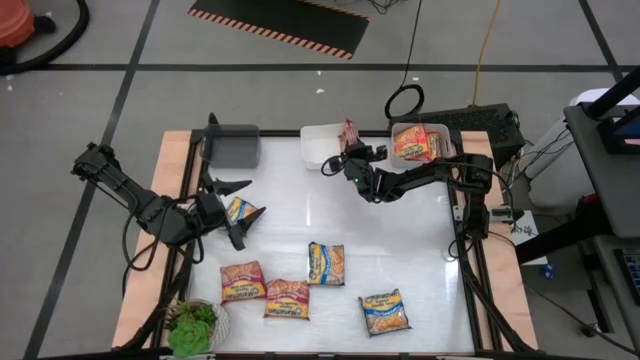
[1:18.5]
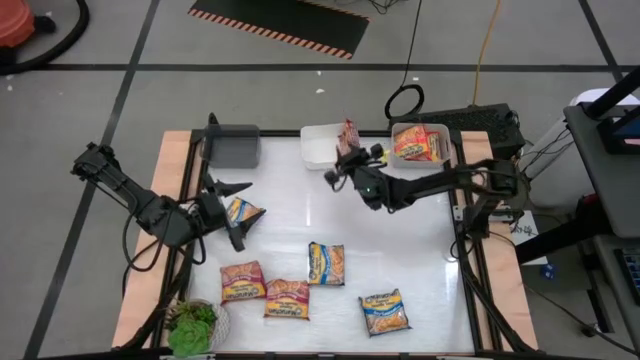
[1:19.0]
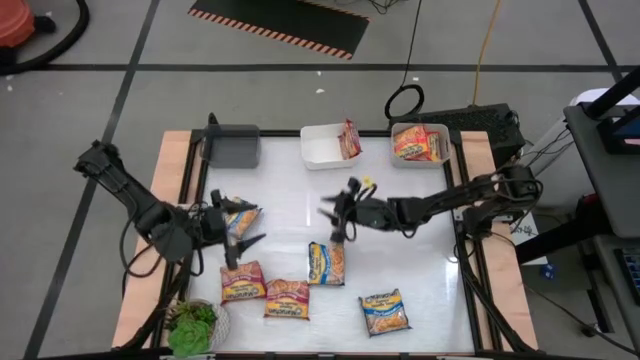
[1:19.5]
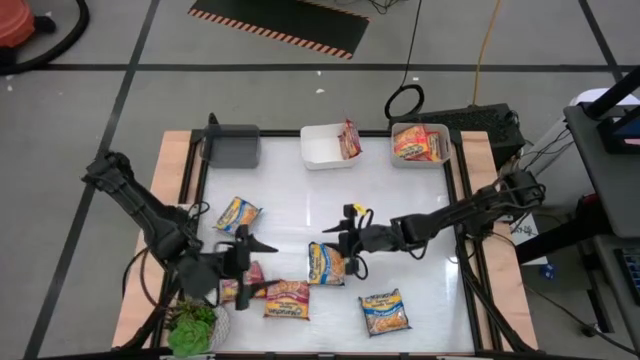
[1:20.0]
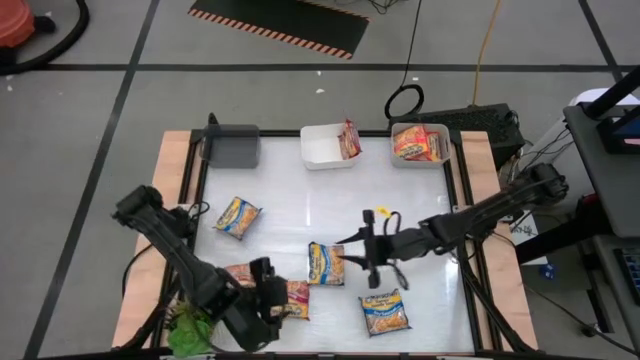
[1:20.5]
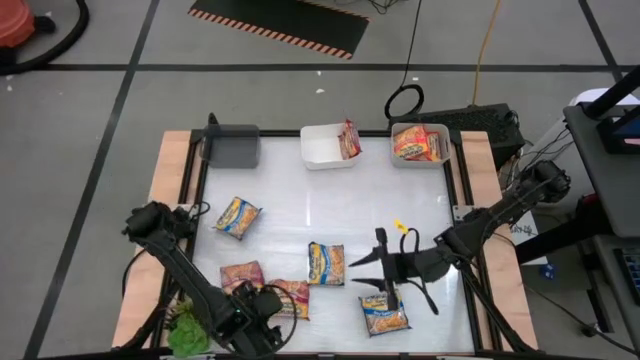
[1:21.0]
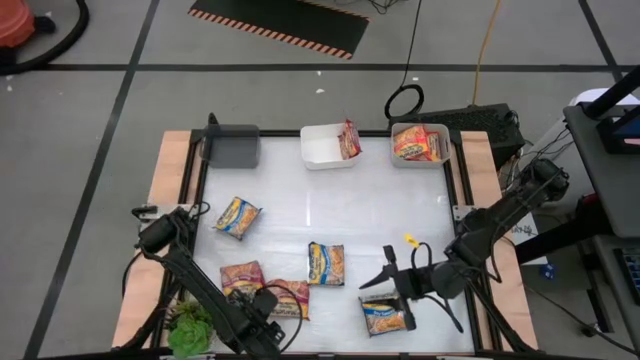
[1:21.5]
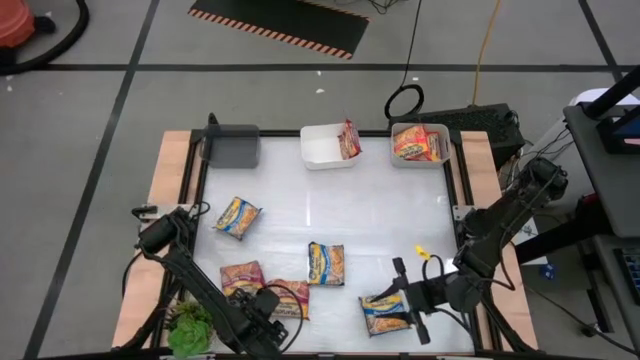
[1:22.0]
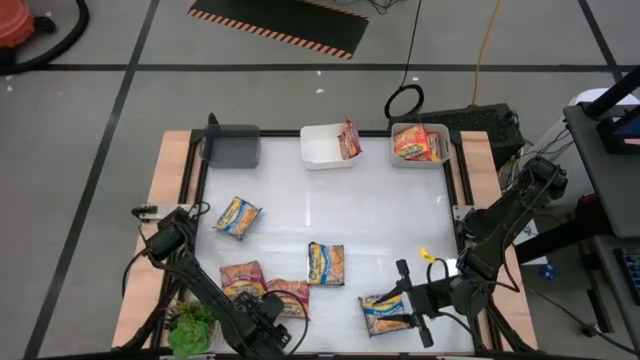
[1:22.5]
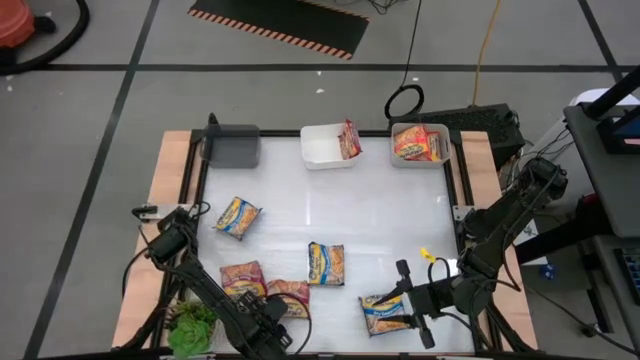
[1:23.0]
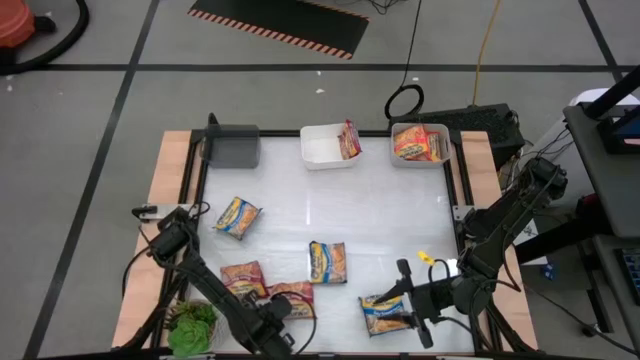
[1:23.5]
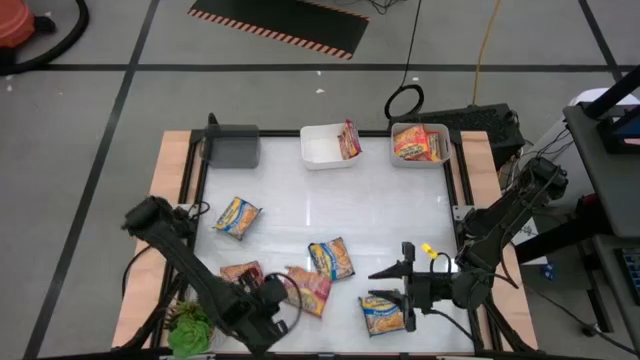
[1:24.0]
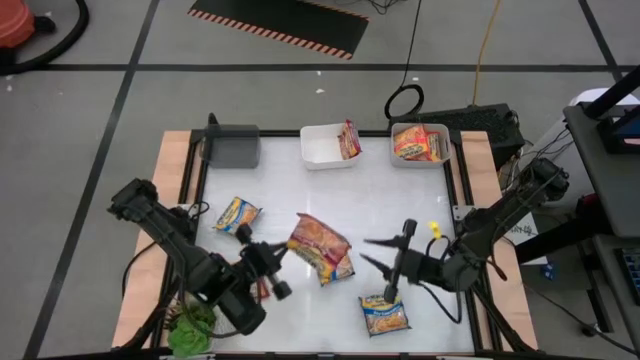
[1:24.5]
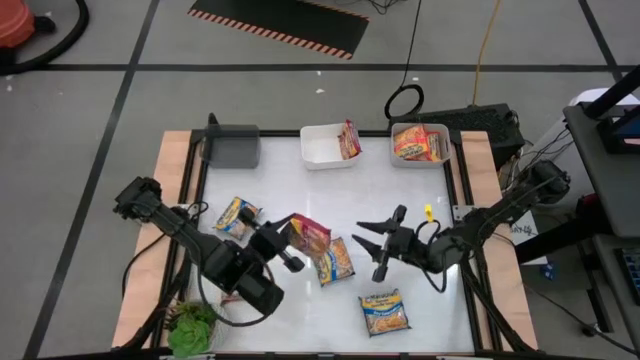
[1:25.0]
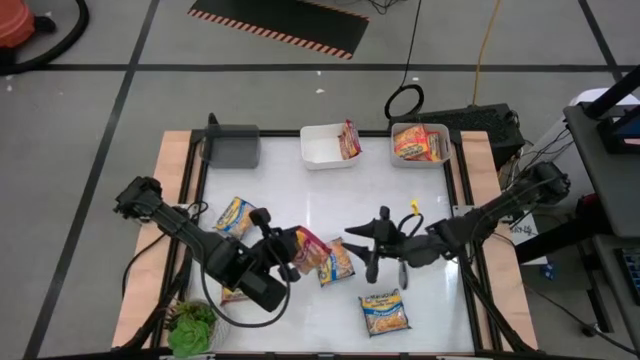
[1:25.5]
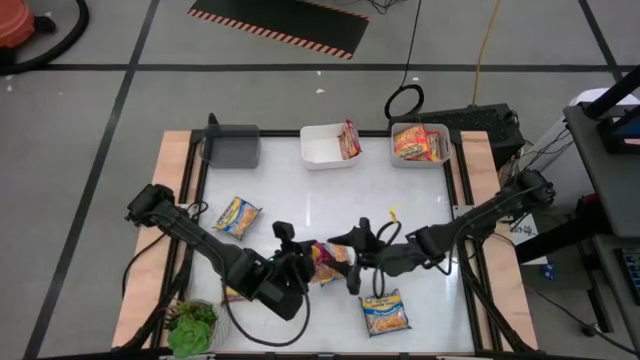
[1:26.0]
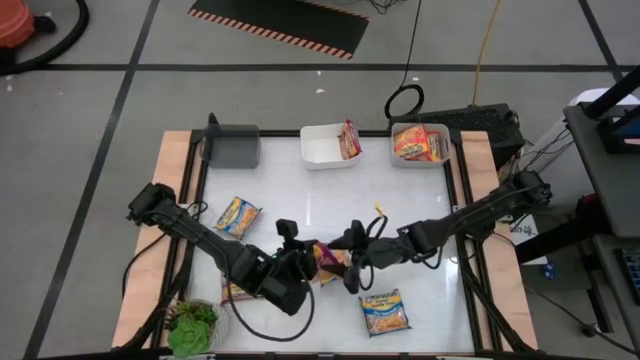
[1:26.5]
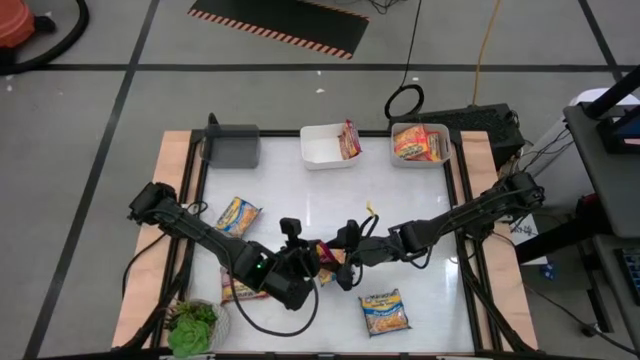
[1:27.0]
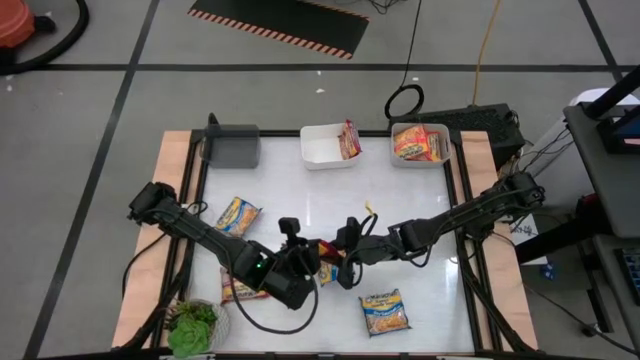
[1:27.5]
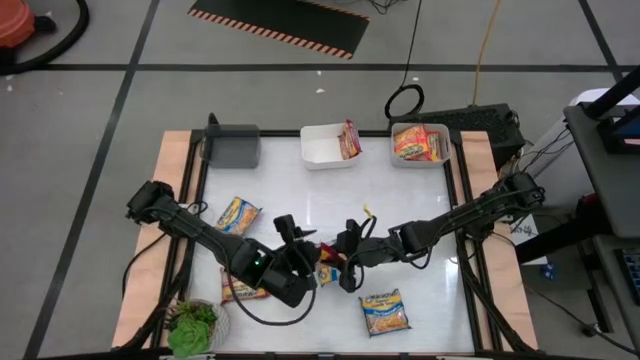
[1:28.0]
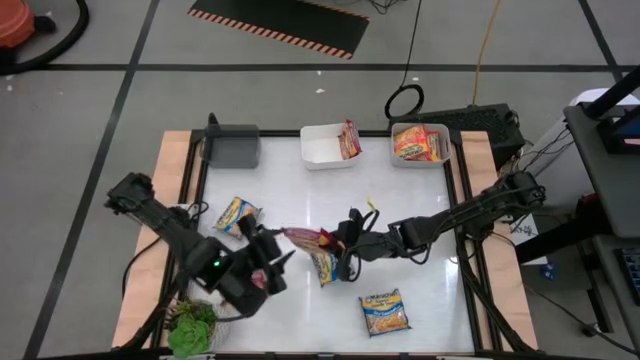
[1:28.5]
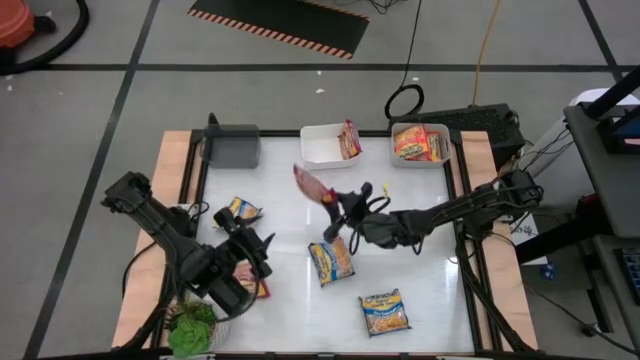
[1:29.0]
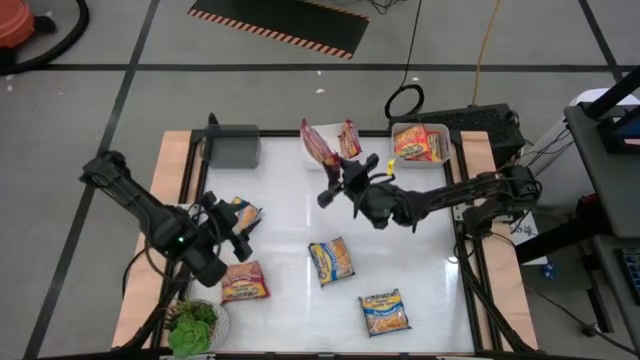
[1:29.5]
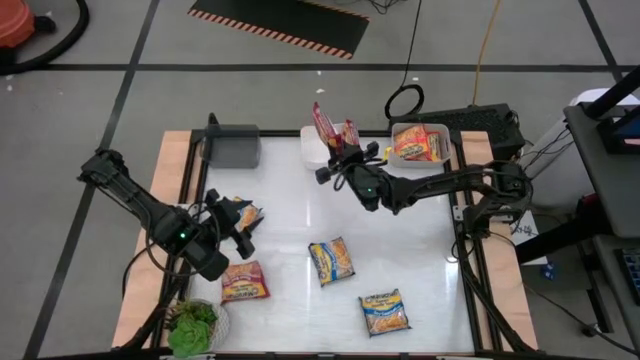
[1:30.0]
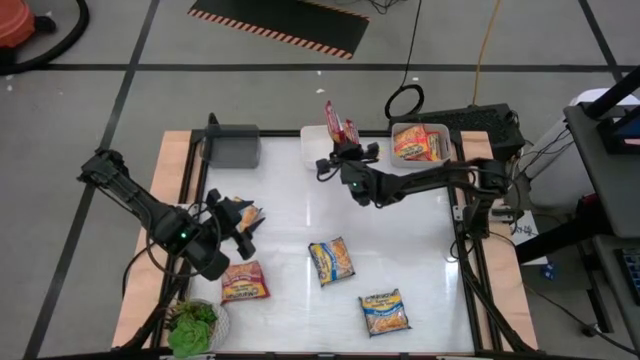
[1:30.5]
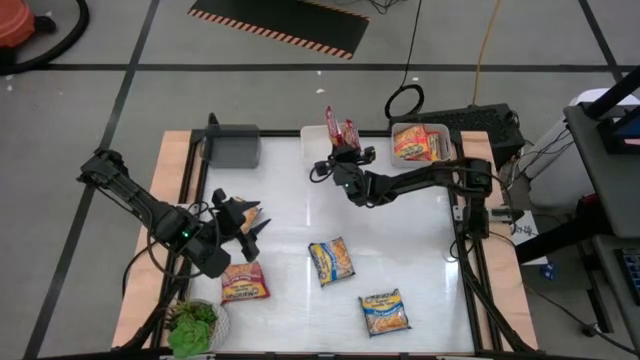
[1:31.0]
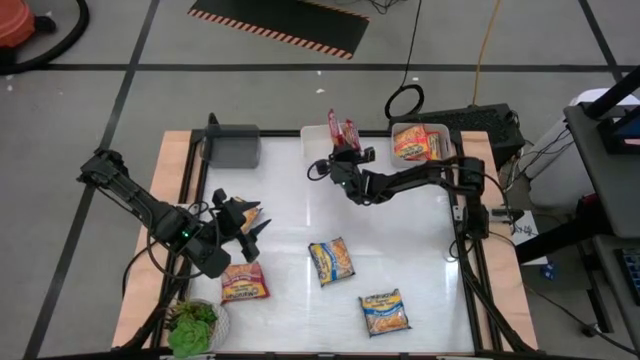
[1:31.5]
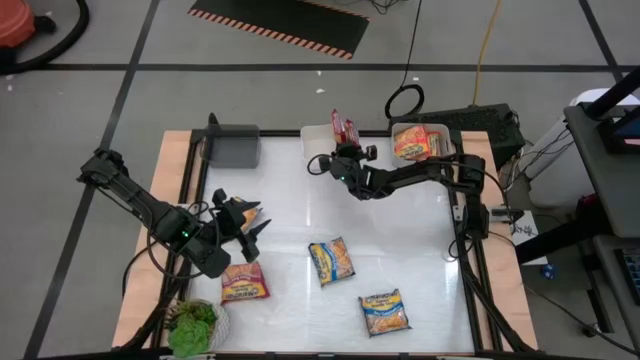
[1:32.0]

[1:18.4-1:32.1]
Task: Sort Maruchan noodles
Put the right red noodle pack into the white bin

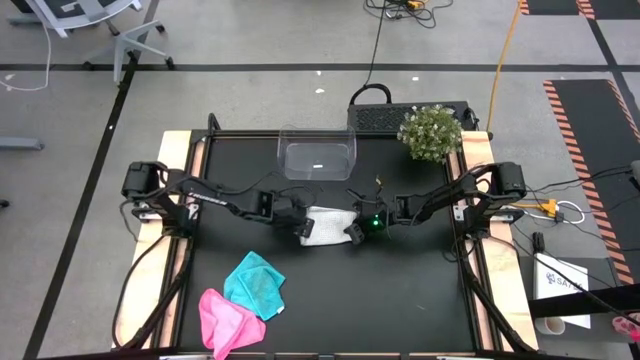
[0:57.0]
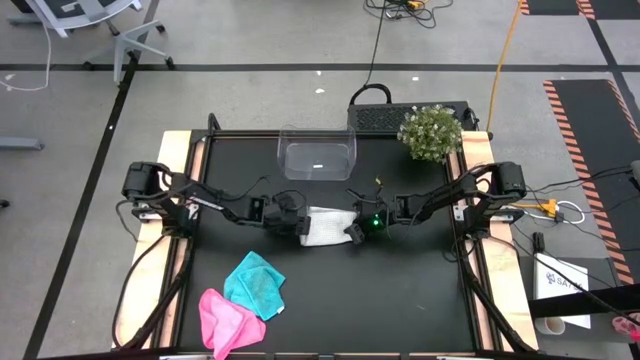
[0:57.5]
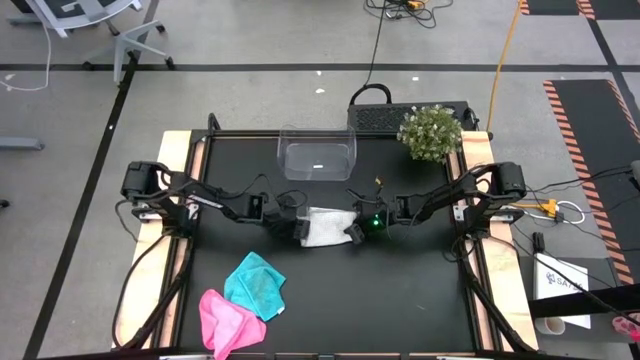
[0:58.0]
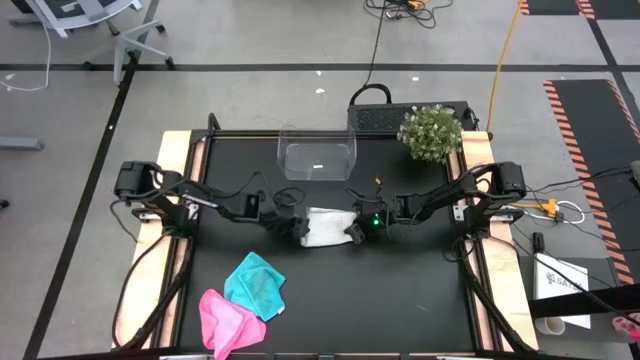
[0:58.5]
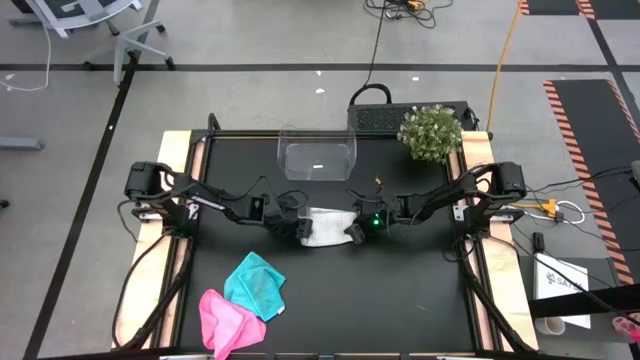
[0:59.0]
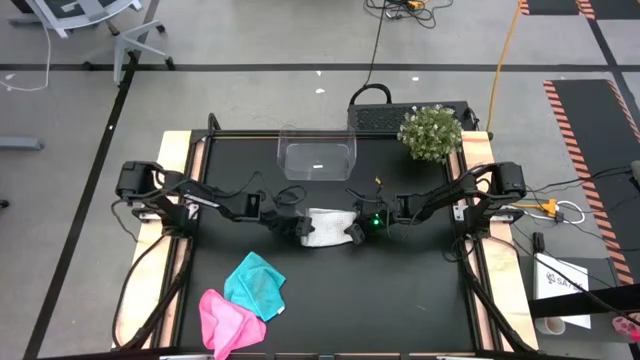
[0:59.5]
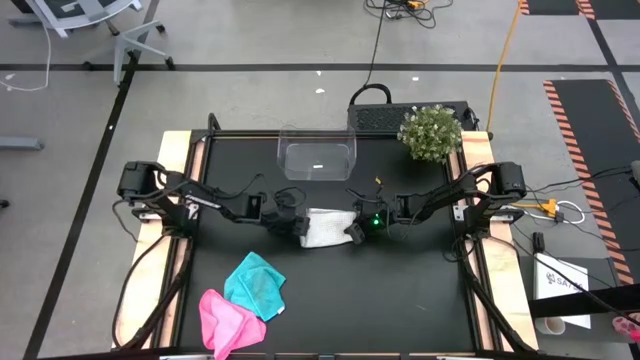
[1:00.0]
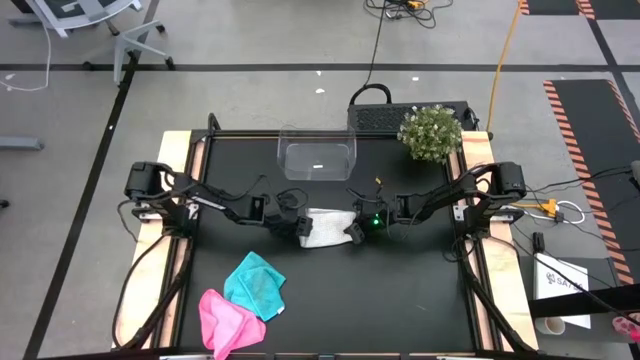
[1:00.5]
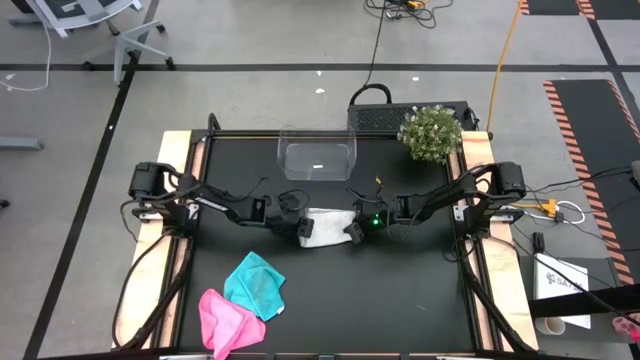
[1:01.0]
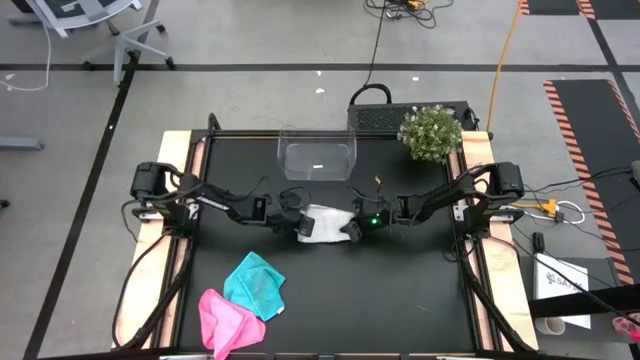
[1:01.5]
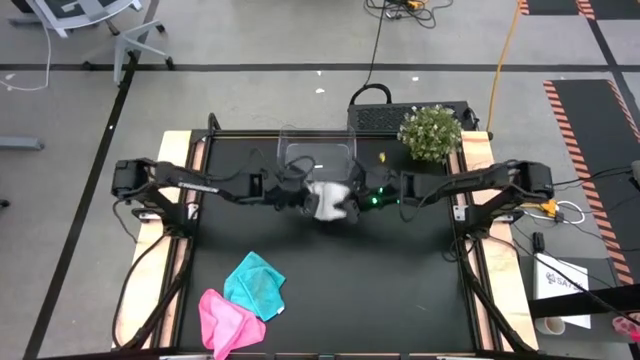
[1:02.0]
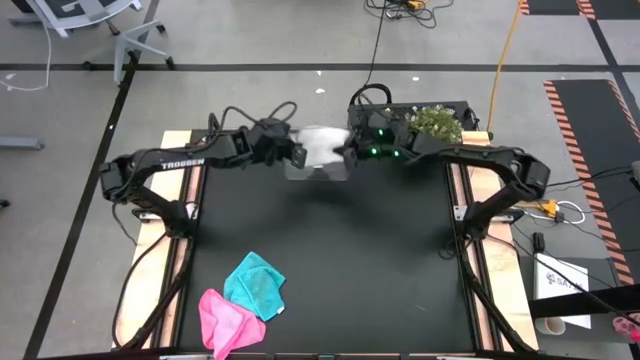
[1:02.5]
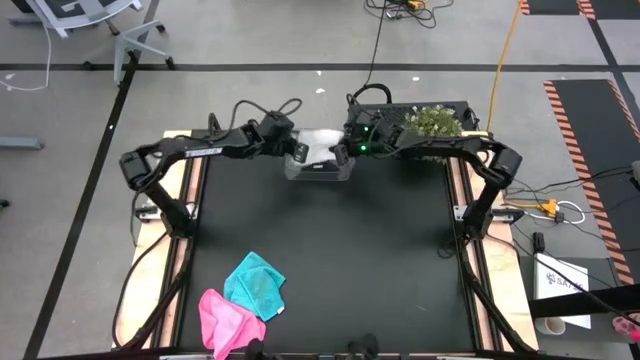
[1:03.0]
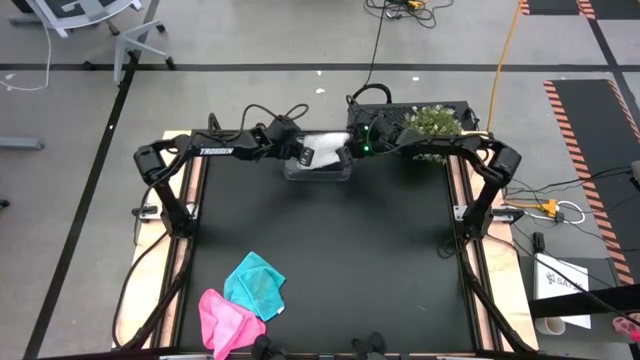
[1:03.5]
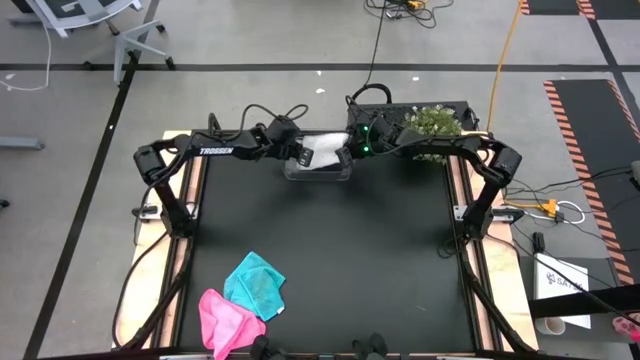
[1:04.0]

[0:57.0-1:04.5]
Task: Fold microfiber towels
Put the white microfiber towel into the transparent bin

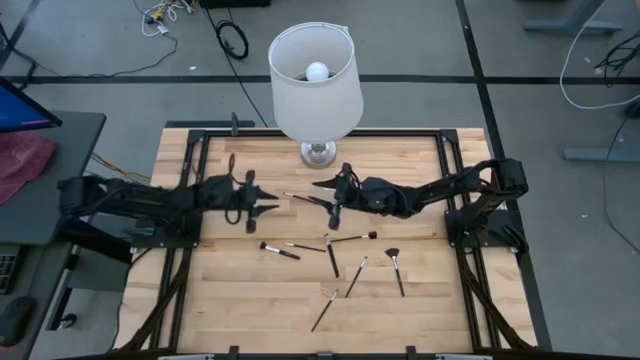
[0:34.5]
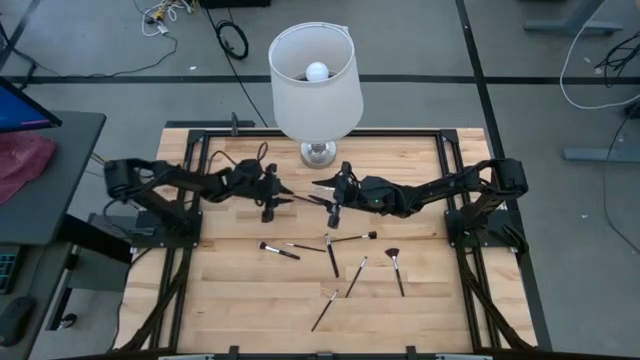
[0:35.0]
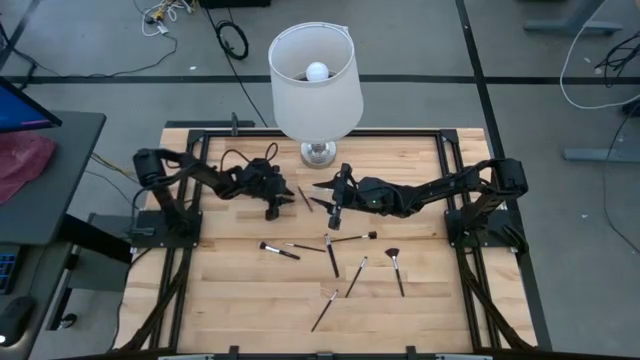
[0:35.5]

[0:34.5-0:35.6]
Task: Put items in baskets/containers
Put the black eyeshadow brush into the transparent organizer
